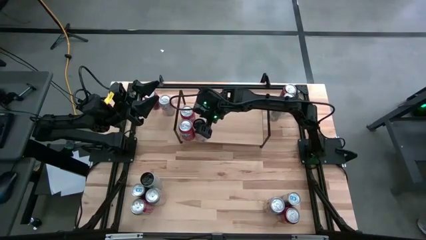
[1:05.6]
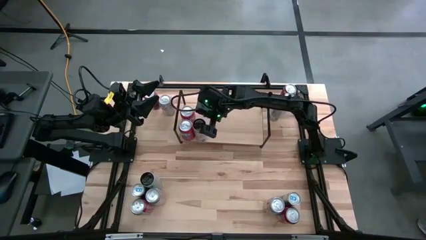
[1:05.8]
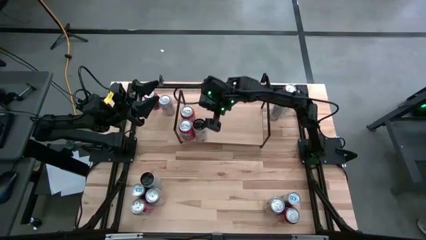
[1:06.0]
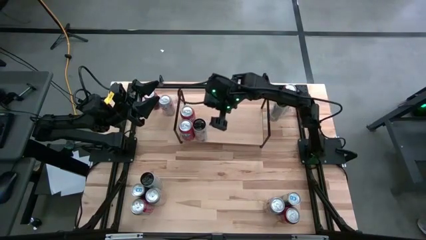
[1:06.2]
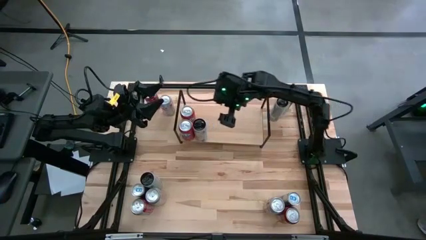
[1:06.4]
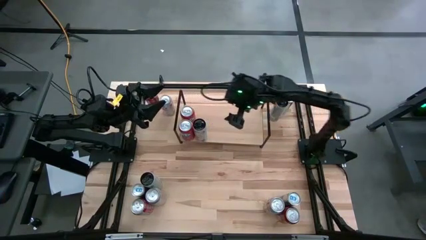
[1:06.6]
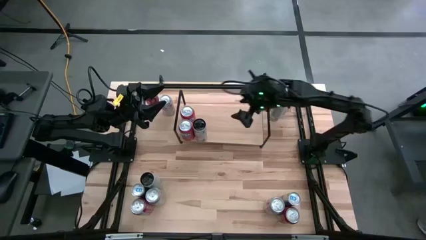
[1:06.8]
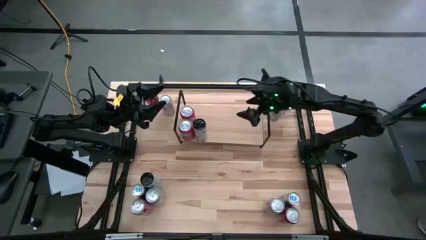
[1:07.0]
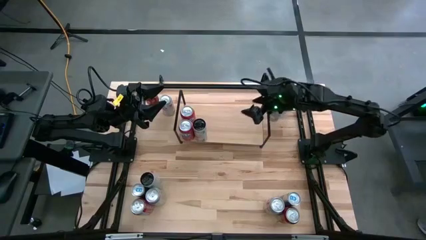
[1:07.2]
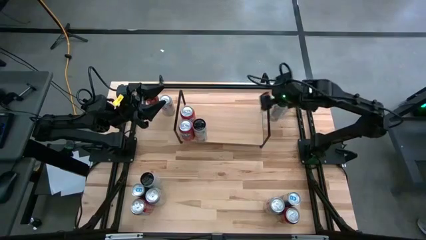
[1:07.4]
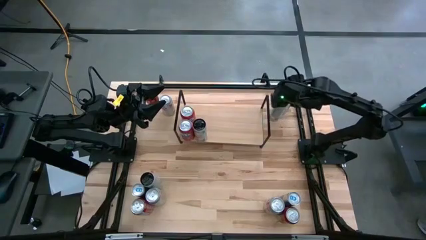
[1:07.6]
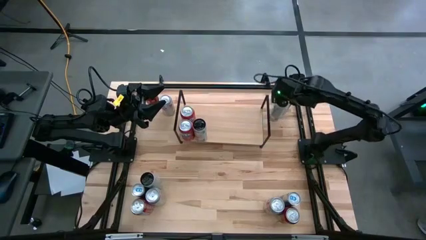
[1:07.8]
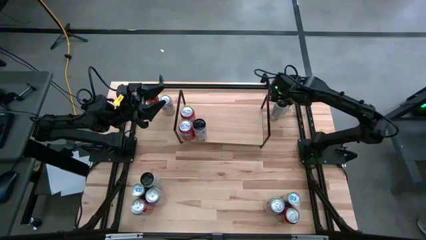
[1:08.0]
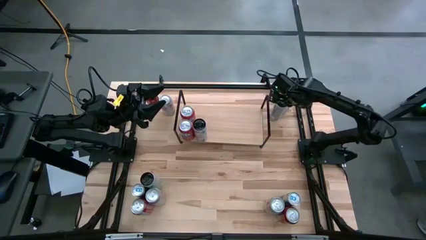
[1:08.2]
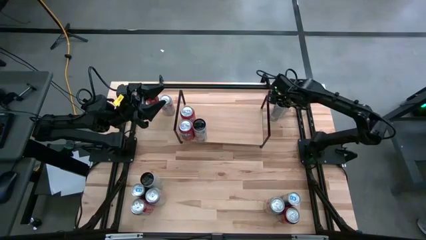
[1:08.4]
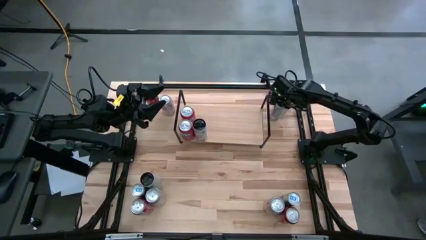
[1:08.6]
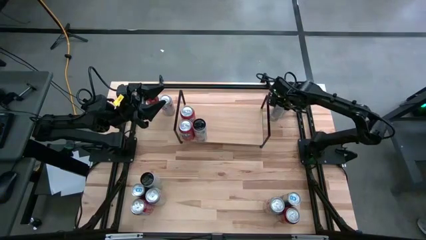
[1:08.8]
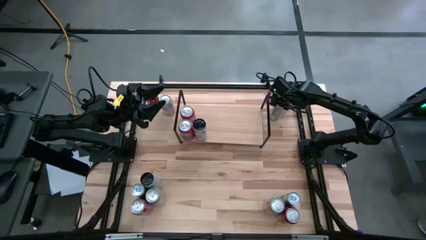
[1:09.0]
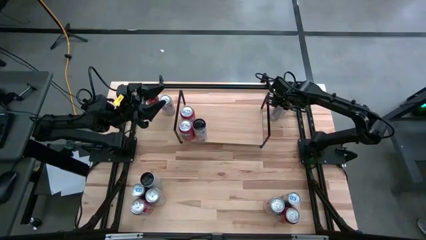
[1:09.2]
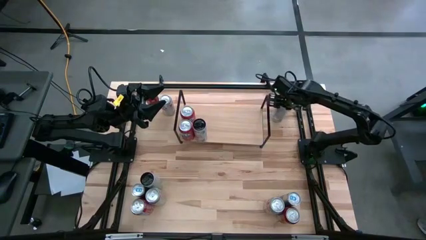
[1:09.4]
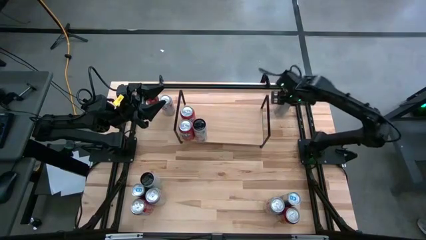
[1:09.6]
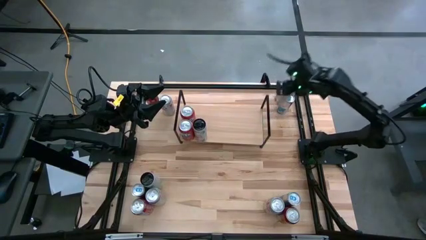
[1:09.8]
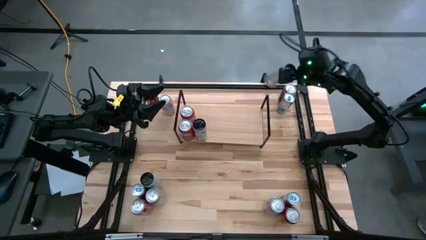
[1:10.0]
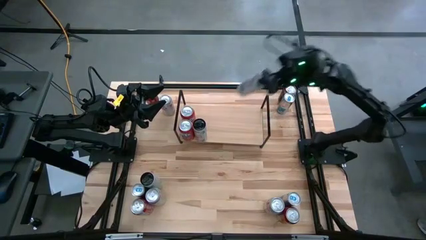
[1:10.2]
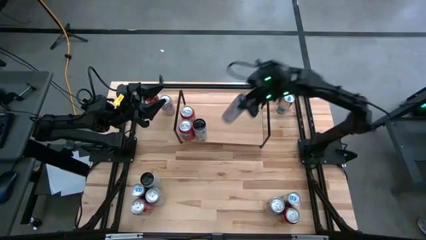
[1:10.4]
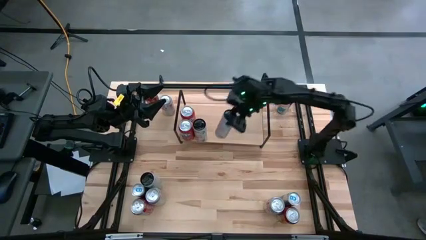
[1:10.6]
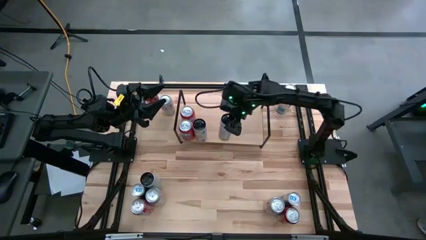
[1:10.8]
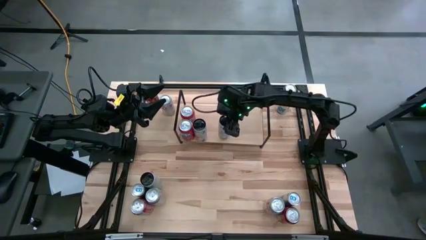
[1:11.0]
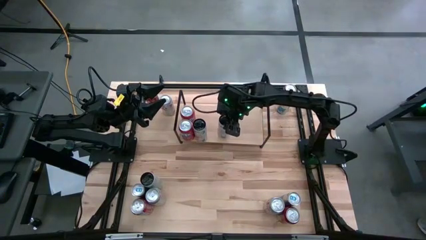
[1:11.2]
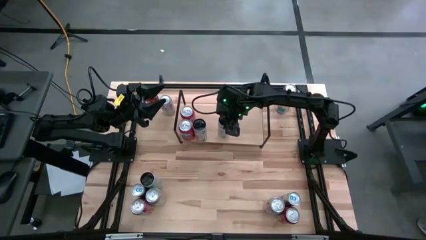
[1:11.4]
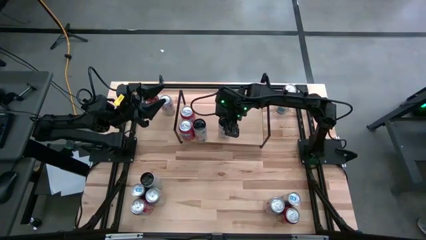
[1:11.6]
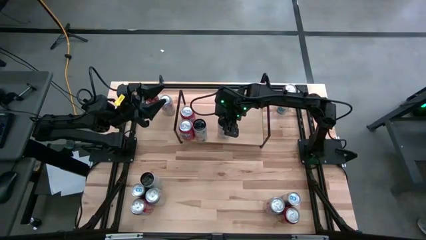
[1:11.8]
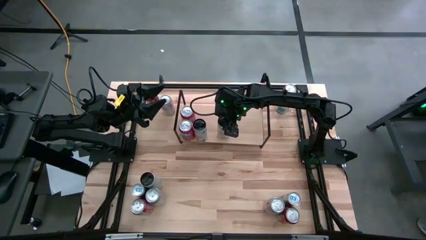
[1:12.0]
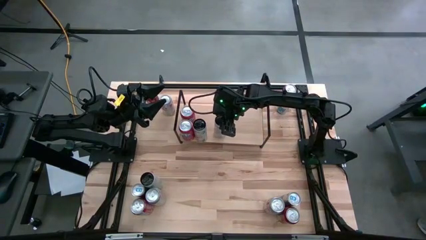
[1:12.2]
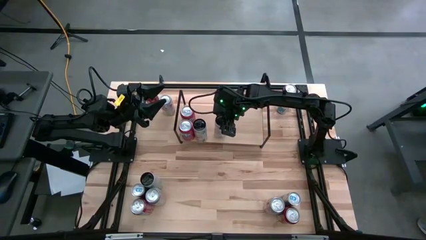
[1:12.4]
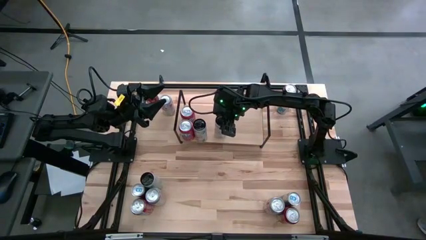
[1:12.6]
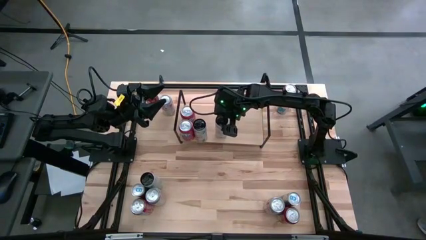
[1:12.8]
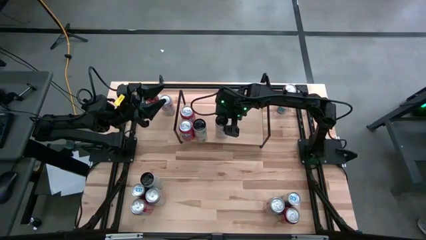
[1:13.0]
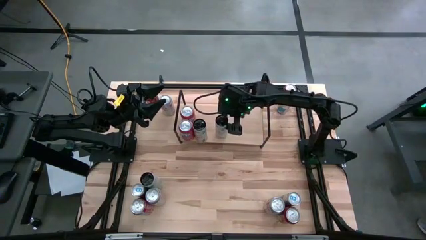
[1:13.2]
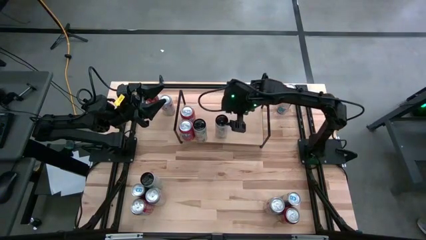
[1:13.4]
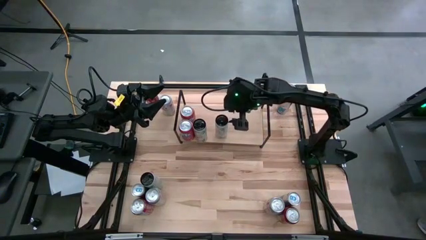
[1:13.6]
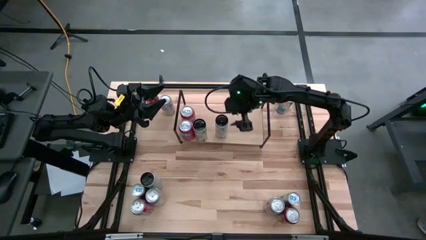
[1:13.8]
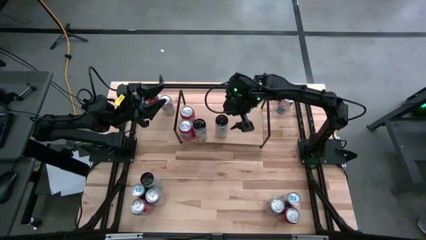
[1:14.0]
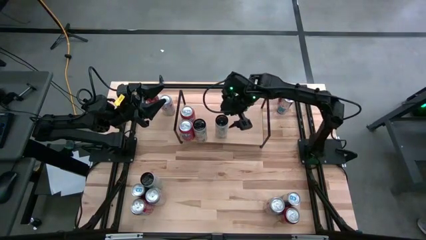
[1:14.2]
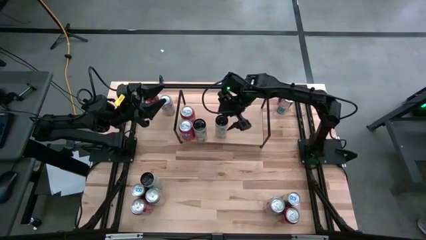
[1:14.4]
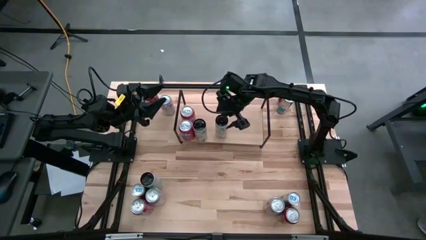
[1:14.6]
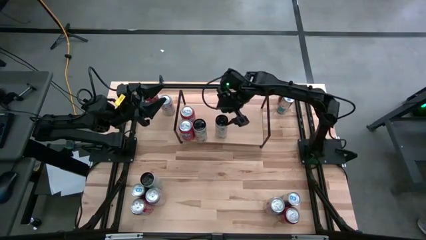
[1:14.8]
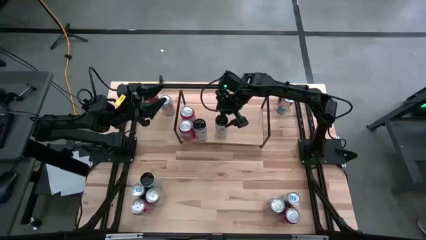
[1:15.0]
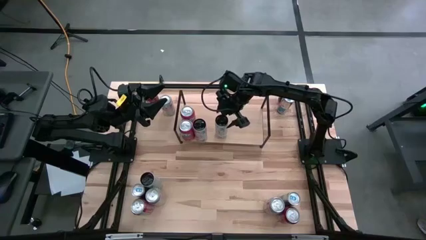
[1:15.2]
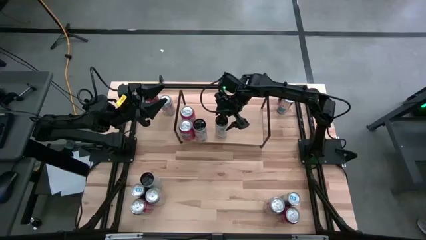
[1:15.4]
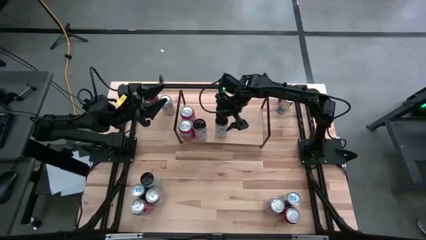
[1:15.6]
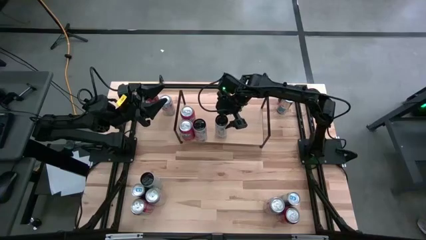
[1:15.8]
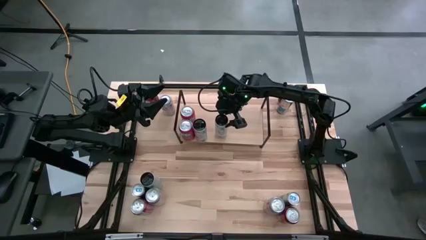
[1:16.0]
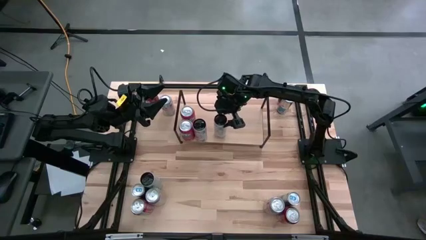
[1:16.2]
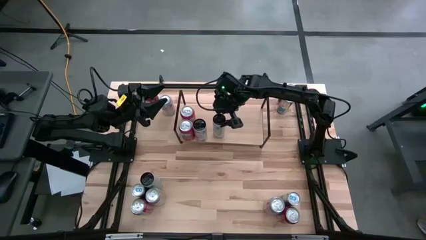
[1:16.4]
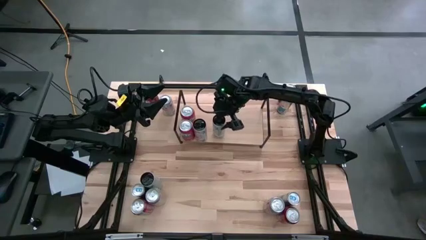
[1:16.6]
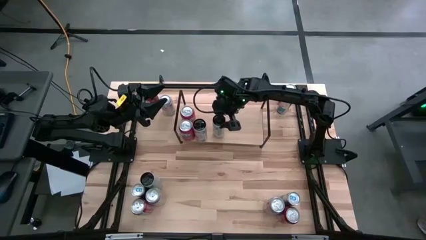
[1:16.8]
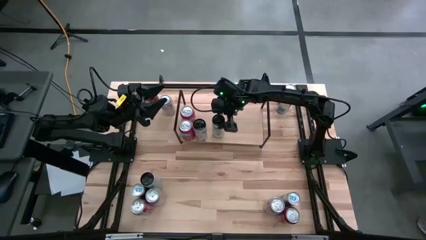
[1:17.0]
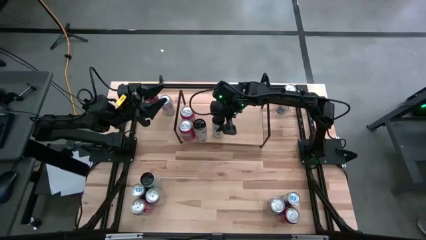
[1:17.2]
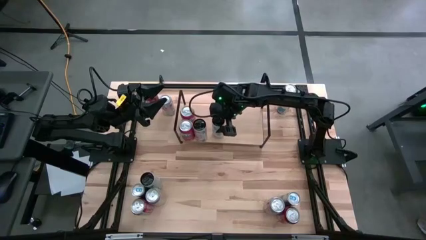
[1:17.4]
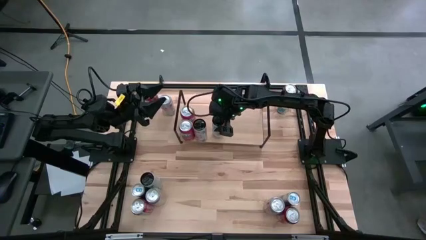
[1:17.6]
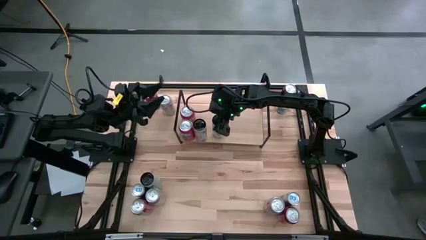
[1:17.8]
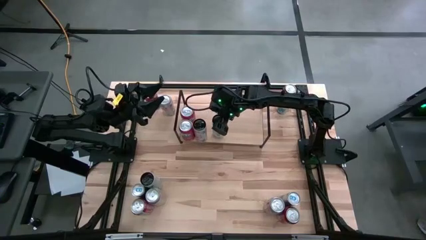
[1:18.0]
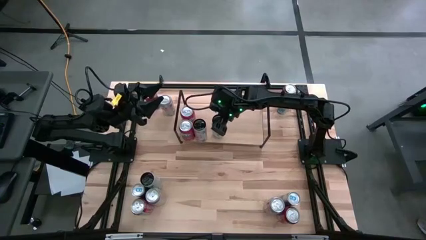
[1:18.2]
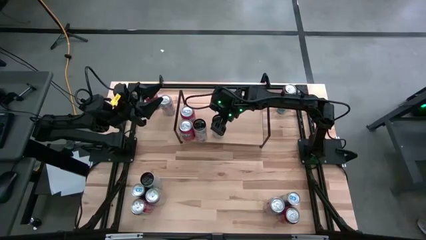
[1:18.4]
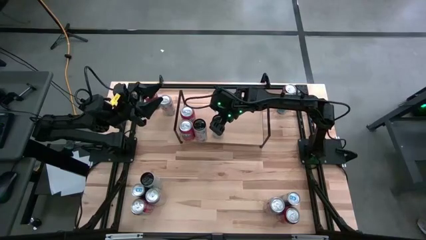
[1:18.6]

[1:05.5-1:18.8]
Task: Place canned beverage on shelf
Put the top white-pink soda can on the shelf aligned with the other white-pink soda can

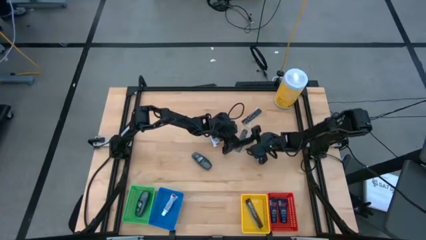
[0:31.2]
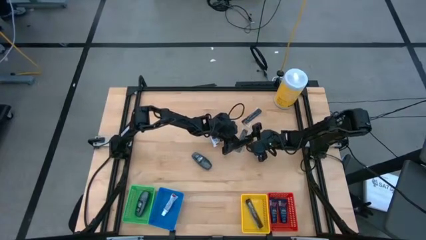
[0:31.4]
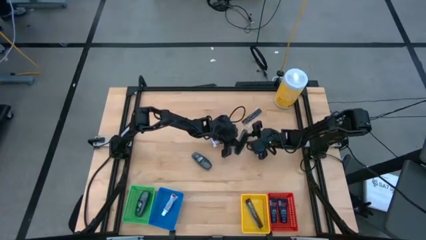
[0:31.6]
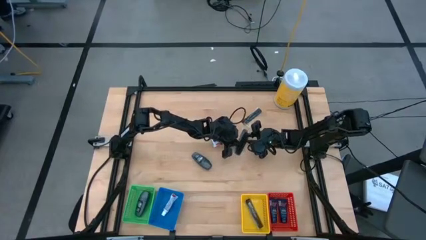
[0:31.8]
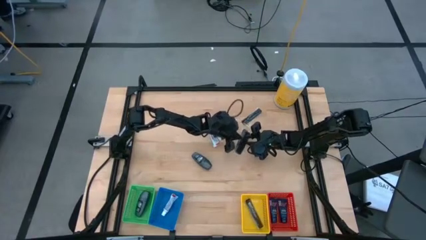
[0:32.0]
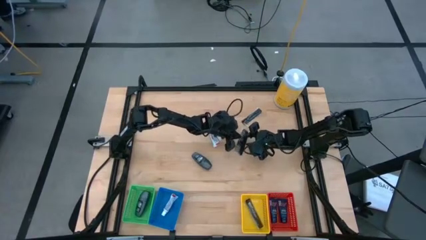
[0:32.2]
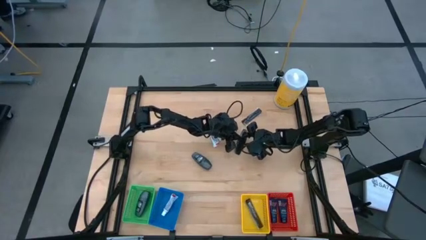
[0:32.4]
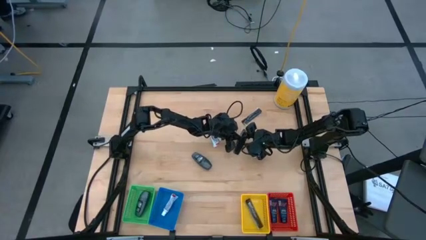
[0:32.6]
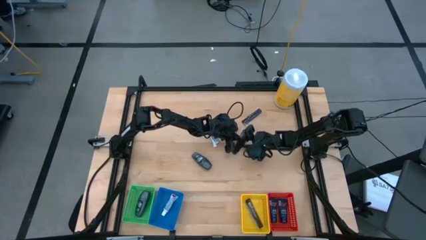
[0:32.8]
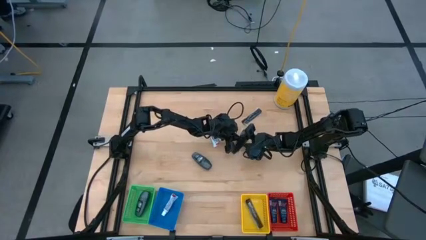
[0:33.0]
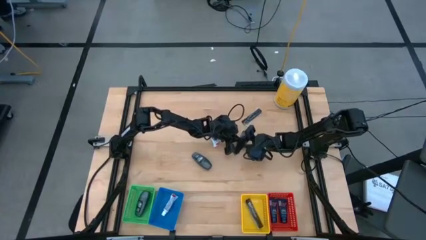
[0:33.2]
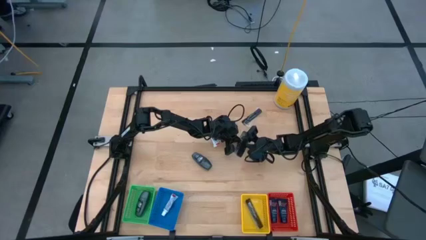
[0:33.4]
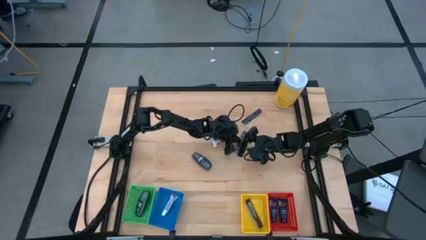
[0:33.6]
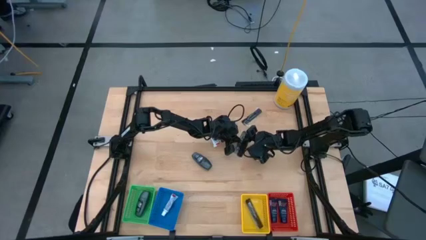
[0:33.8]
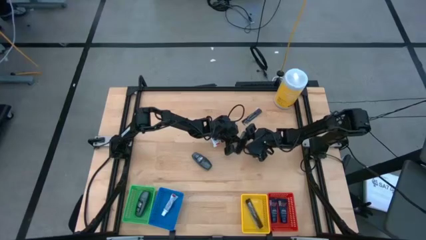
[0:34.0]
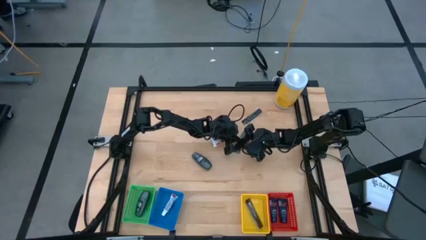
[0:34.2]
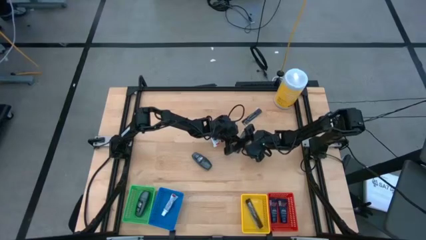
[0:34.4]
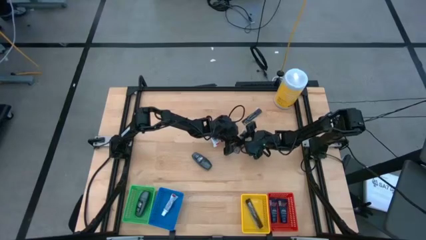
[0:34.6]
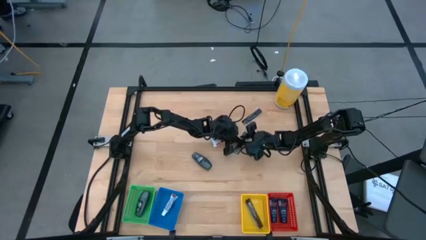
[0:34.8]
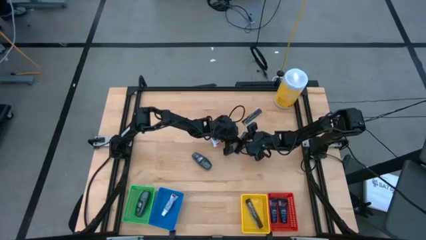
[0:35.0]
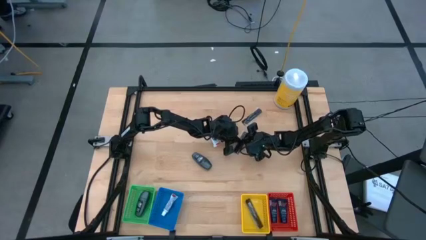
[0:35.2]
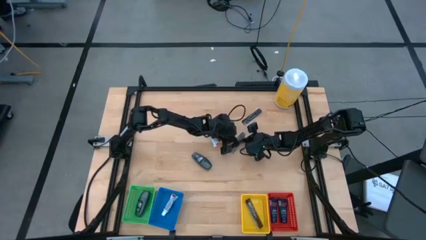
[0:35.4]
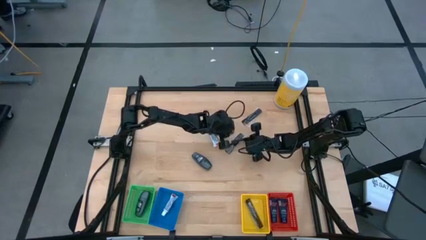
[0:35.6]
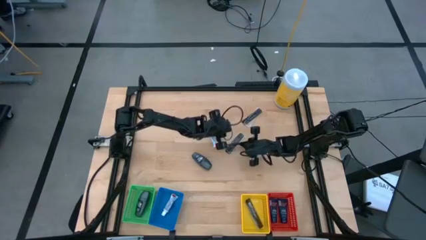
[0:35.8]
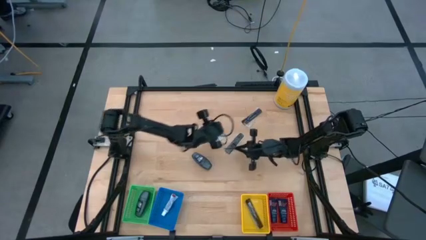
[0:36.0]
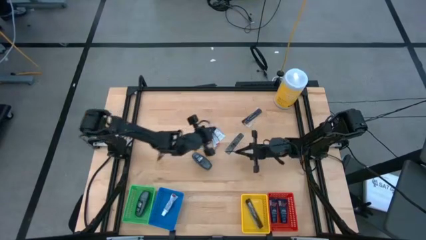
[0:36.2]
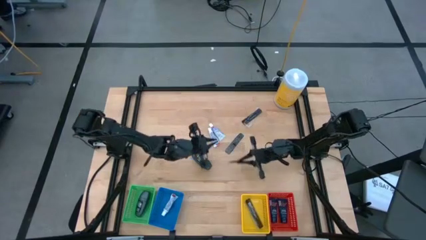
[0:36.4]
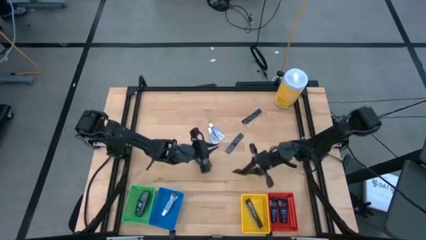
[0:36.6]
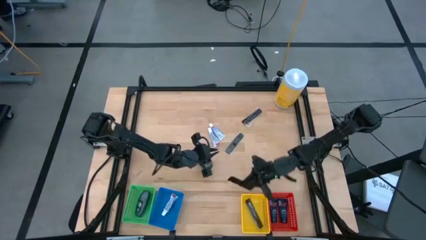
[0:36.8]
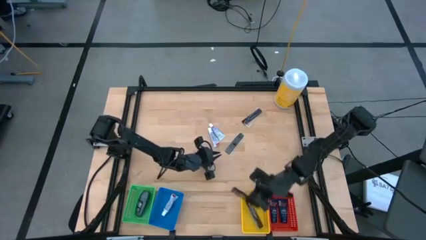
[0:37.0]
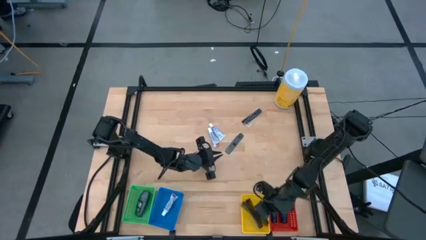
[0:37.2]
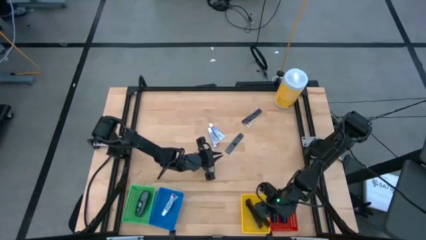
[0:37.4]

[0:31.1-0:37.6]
Task: Pick & Place Travel size toiletries
Put the black comb into the yellow bin
